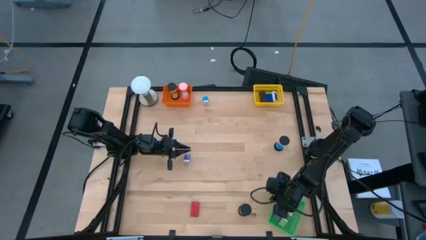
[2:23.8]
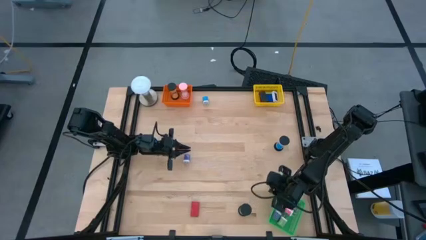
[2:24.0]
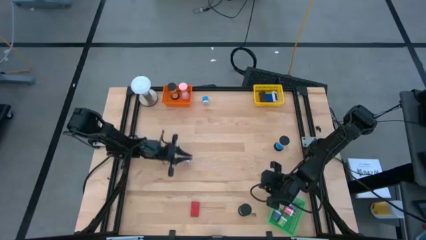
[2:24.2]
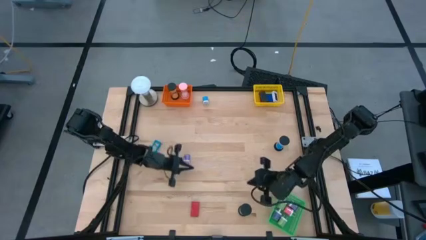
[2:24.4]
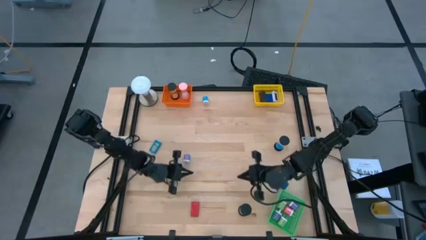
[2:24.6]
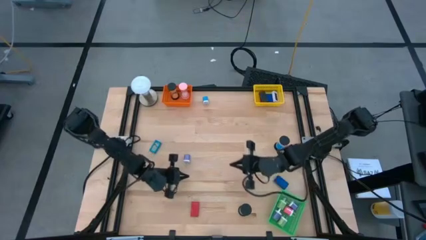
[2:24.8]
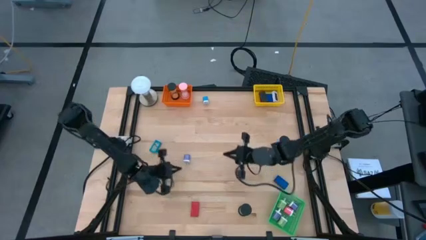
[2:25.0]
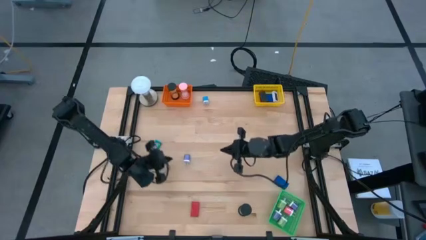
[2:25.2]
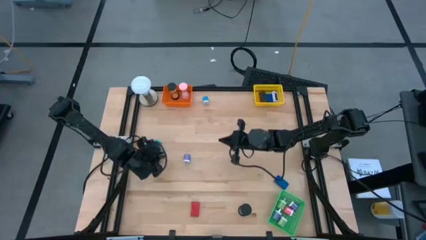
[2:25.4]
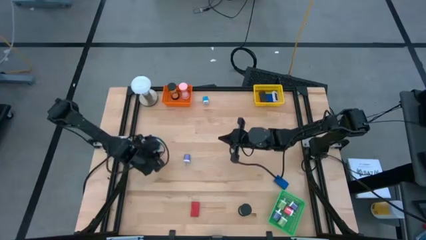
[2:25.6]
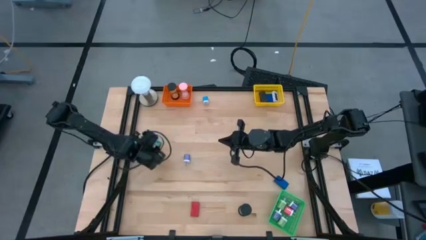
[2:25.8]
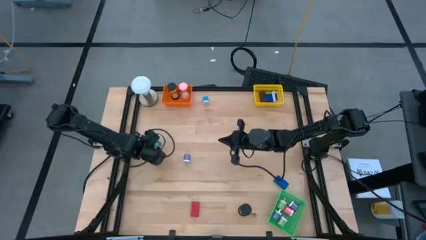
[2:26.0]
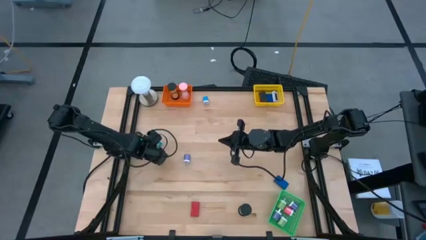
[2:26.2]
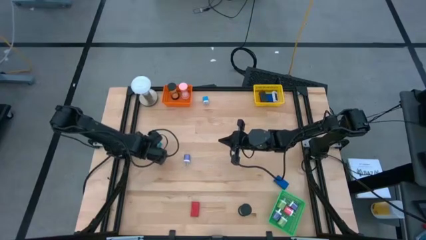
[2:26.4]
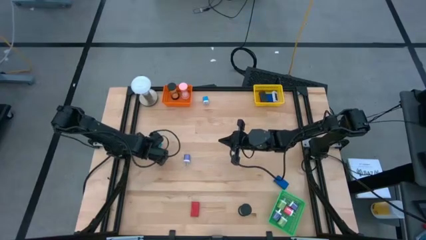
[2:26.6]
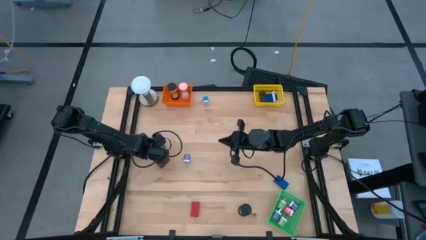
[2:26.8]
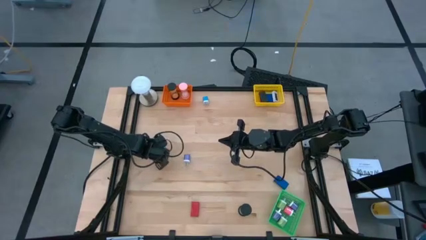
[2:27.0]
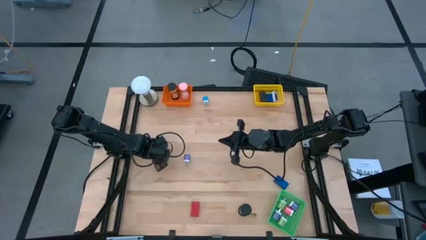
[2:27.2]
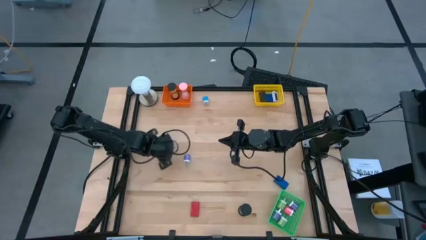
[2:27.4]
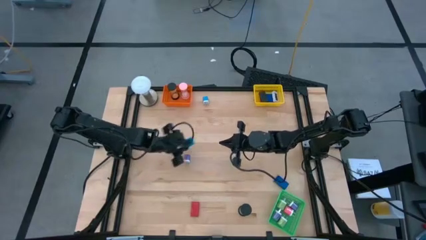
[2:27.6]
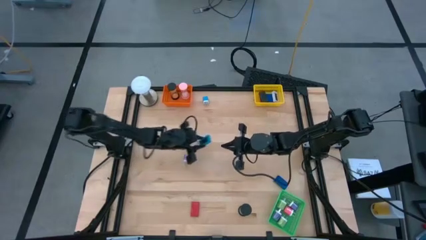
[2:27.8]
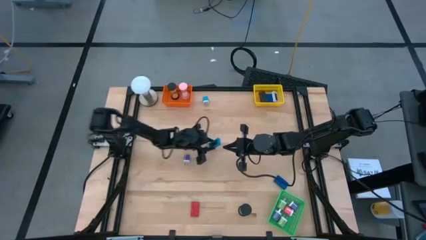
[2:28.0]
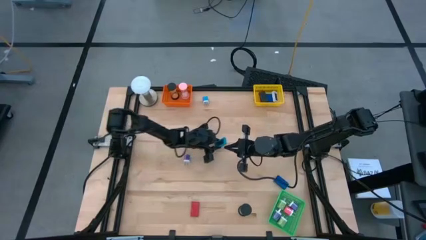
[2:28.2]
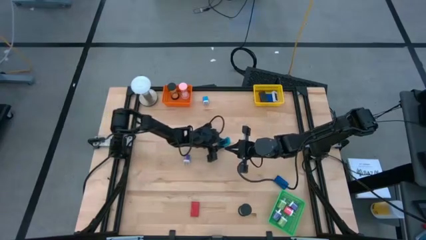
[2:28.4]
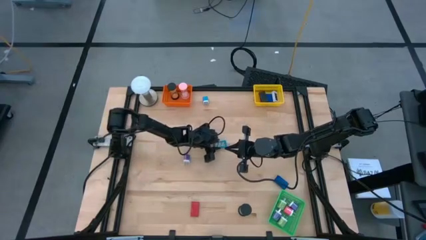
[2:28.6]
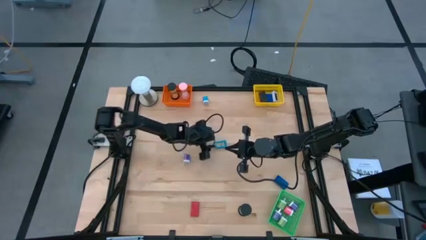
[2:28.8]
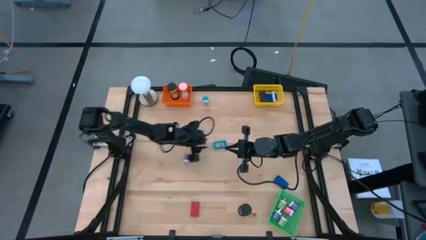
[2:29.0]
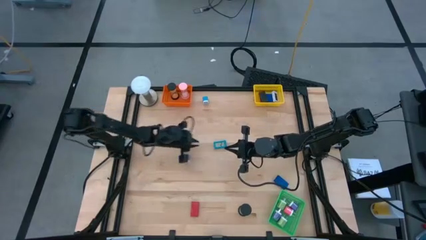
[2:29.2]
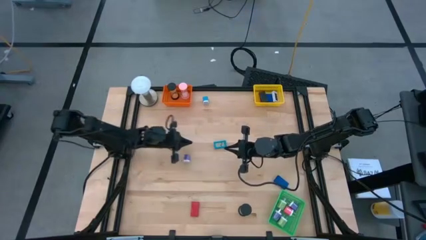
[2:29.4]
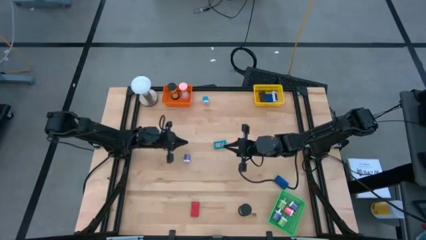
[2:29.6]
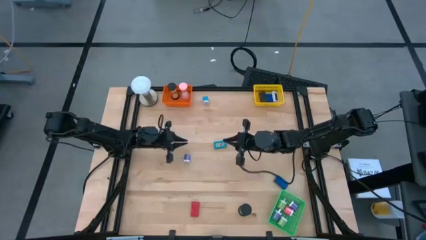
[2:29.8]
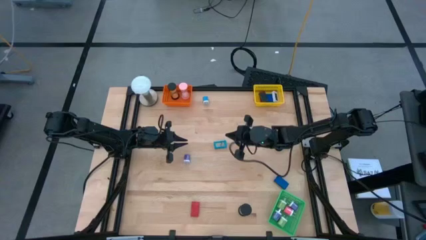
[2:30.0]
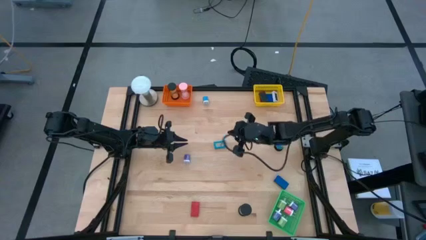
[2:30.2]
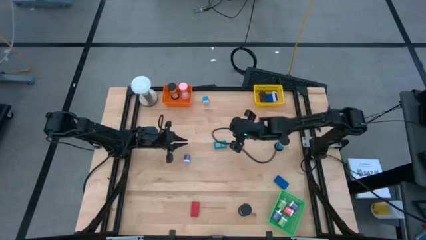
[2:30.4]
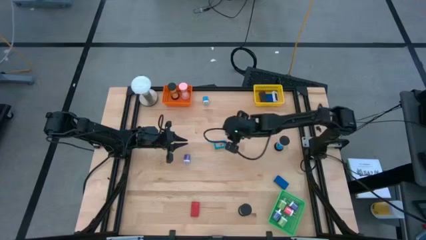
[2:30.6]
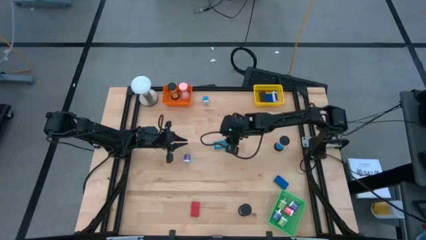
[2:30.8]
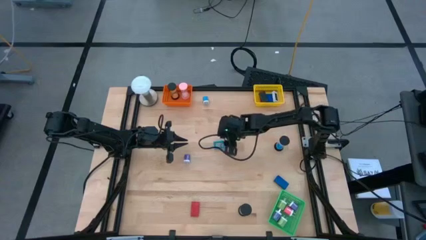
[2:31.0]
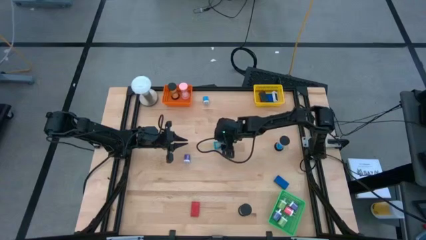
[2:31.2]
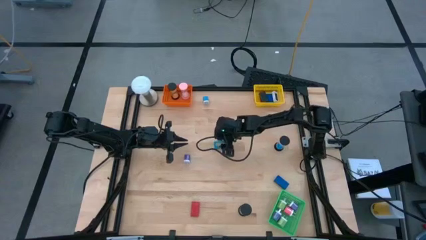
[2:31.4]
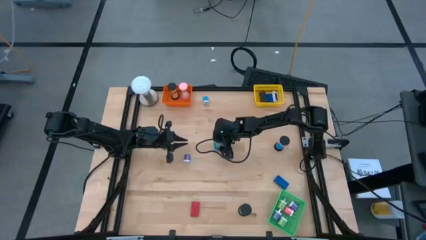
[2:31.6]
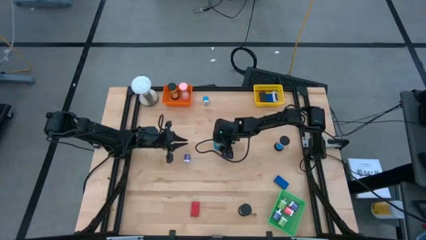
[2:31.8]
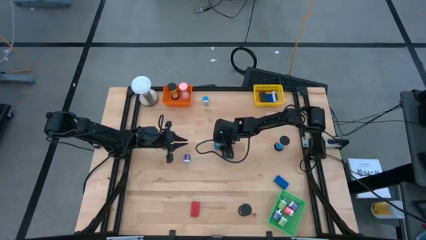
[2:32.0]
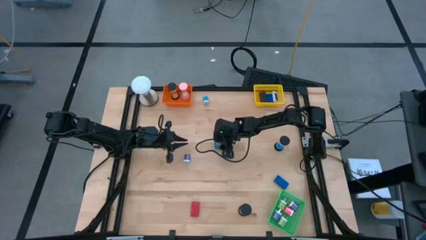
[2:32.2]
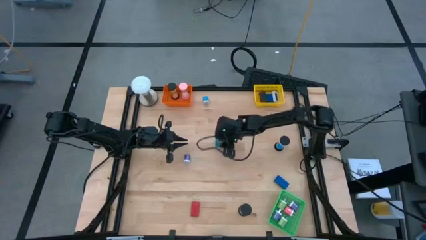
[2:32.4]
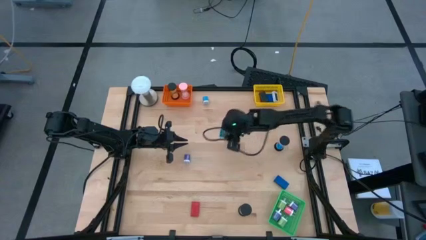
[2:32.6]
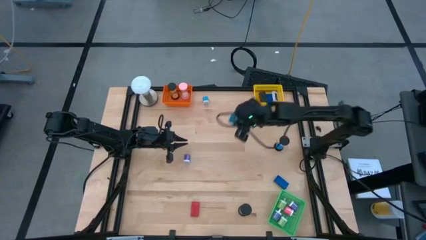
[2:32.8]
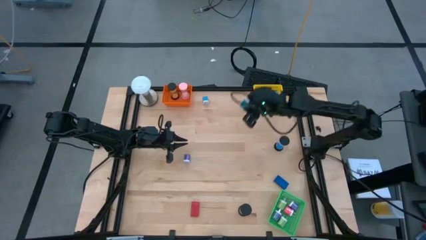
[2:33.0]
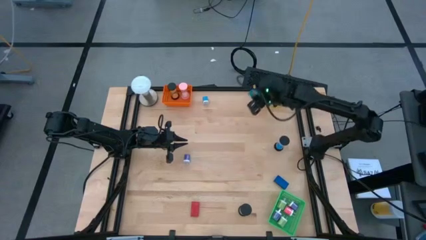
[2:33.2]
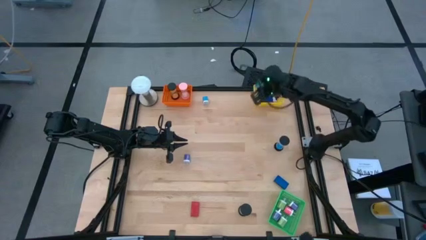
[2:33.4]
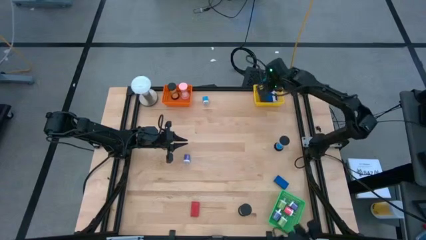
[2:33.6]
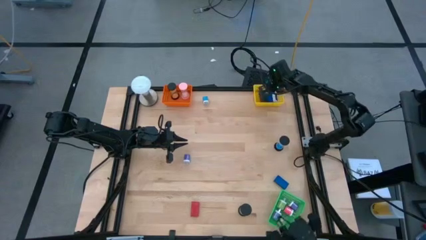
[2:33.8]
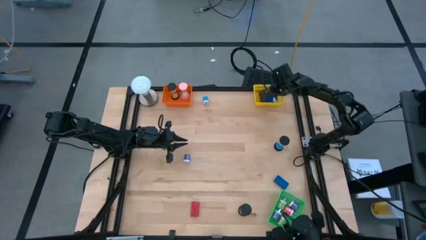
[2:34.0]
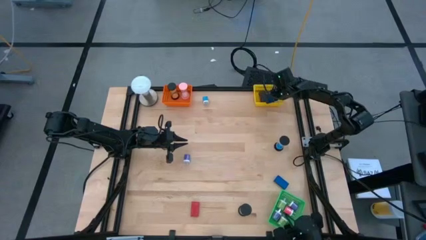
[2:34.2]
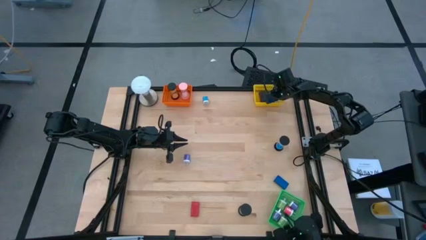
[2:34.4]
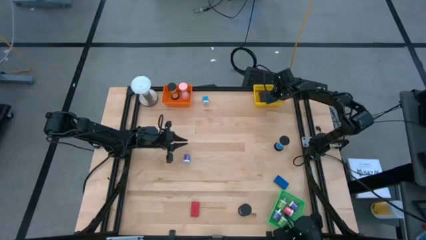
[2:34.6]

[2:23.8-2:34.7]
Task: Pick & Place Office items
Put the blue timer into the yellow basket

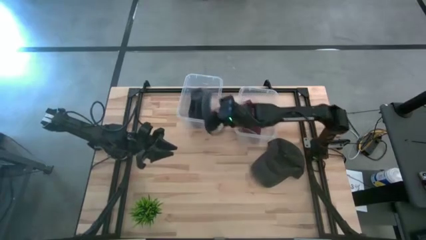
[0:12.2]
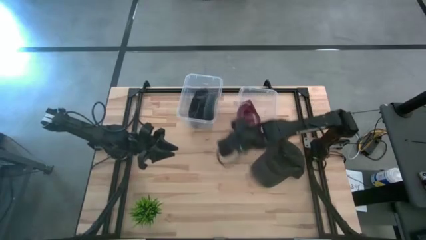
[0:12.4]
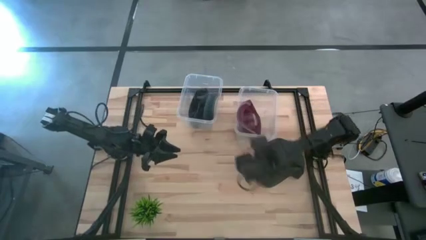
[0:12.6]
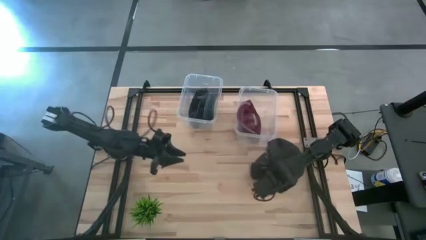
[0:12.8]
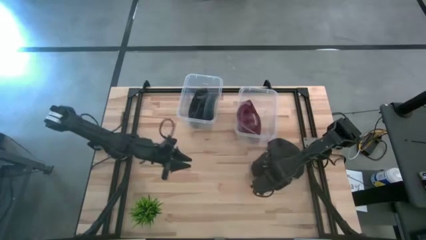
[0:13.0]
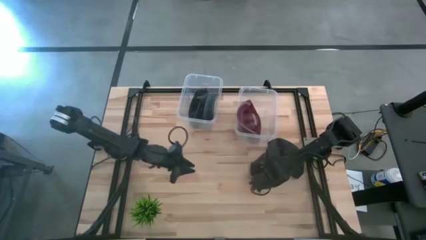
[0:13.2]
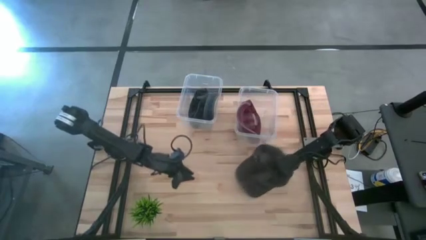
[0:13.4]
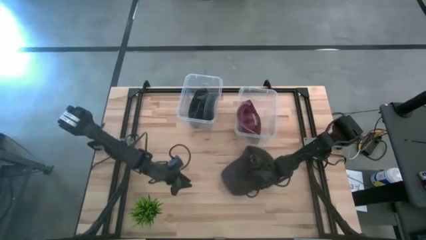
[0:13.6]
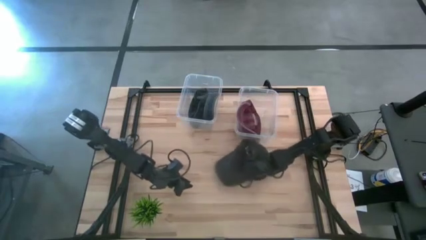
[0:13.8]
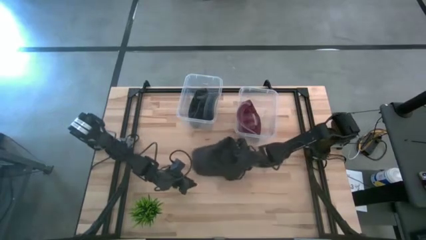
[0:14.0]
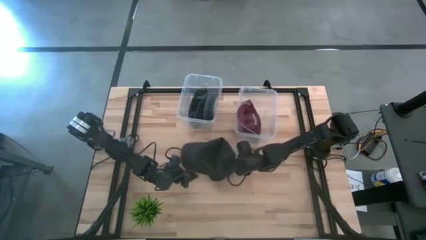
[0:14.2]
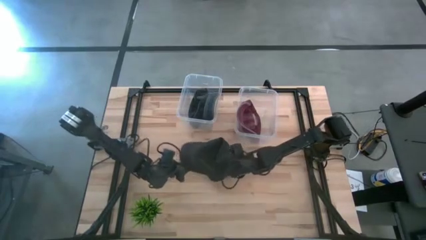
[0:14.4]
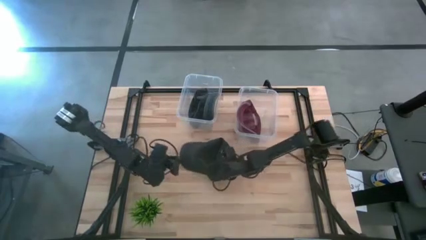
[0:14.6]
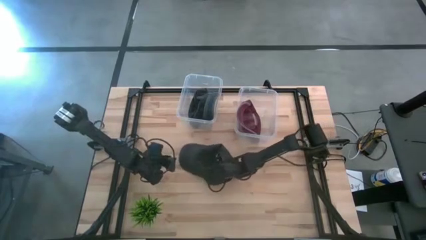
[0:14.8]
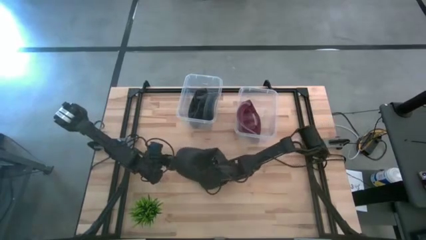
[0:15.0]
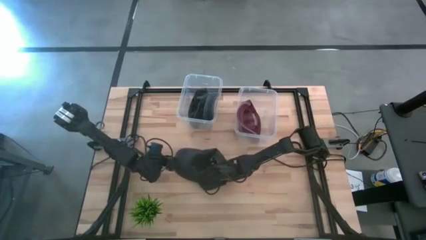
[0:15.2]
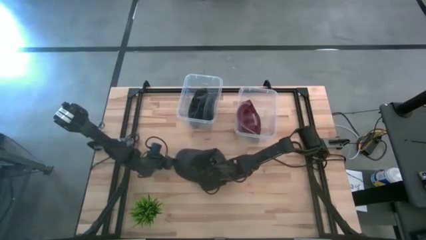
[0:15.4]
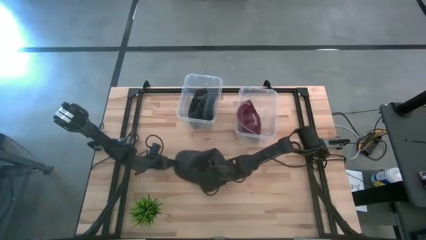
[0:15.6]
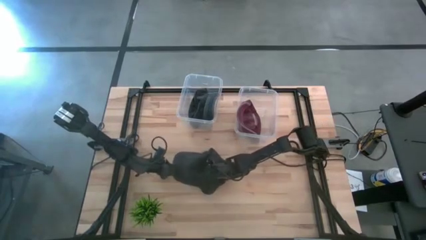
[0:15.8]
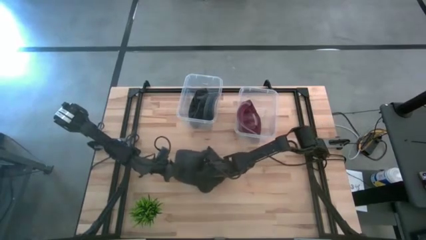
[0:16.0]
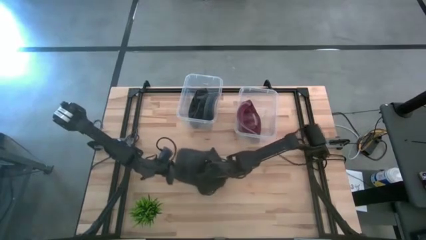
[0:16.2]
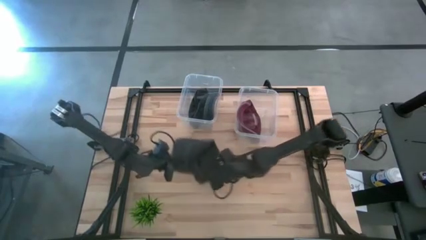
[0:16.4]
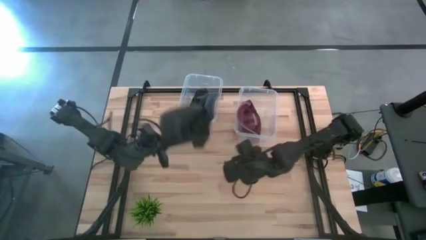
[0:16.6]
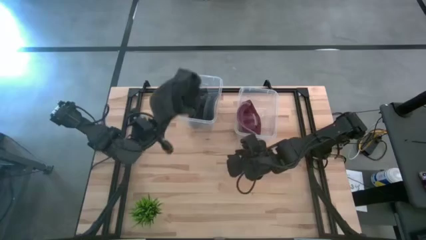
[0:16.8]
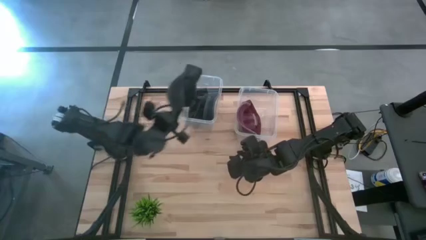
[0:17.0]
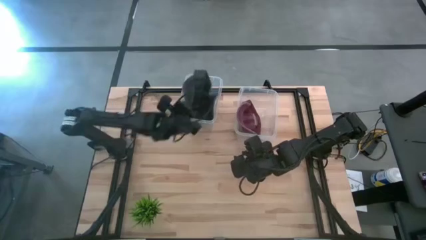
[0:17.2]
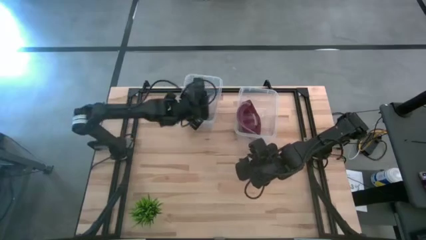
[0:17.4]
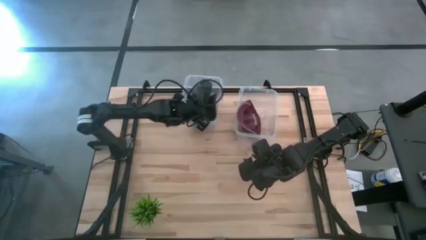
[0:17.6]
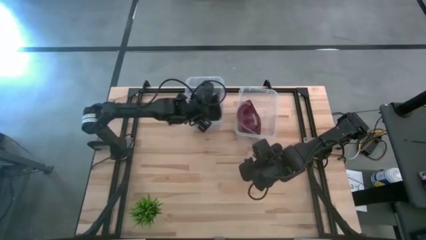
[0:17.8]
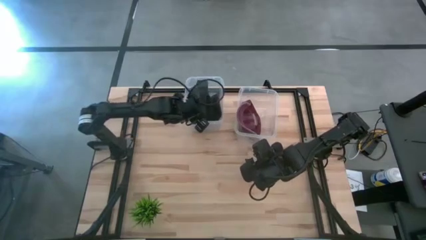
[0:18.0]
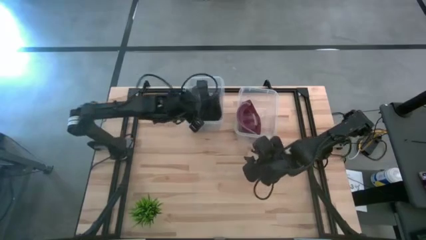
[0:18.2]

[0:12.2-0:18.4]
Task: Pick & Place hat
Put the black cap into the left transparent bin
